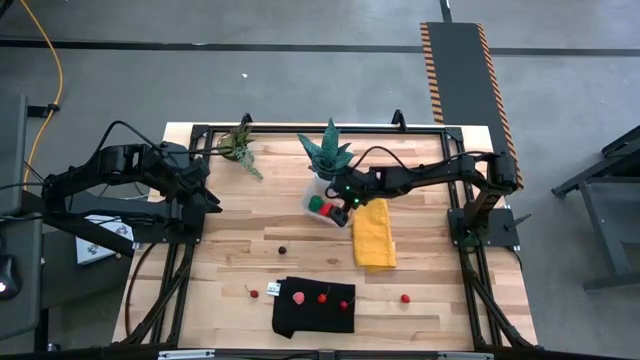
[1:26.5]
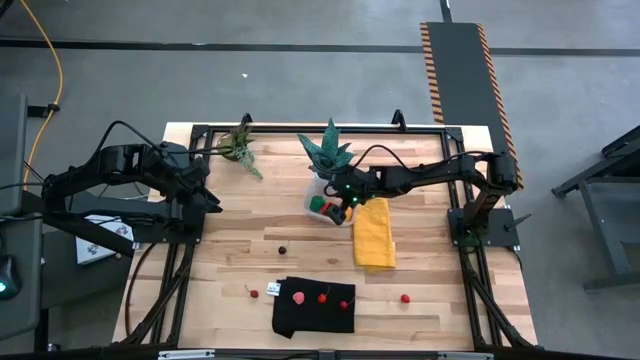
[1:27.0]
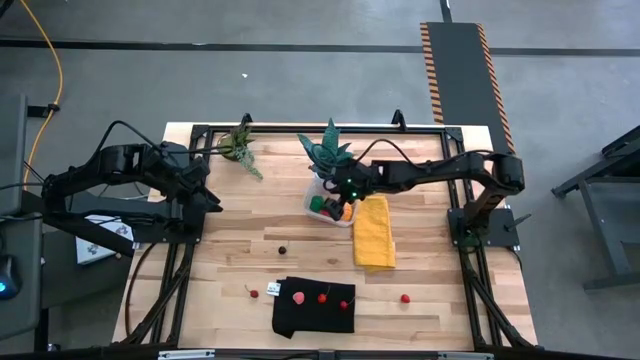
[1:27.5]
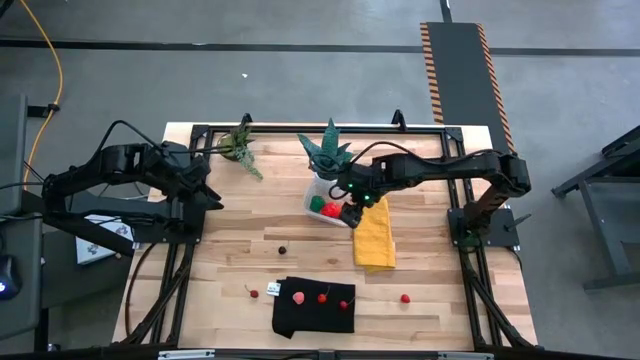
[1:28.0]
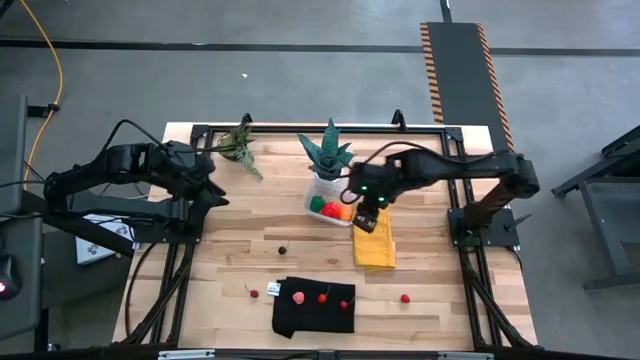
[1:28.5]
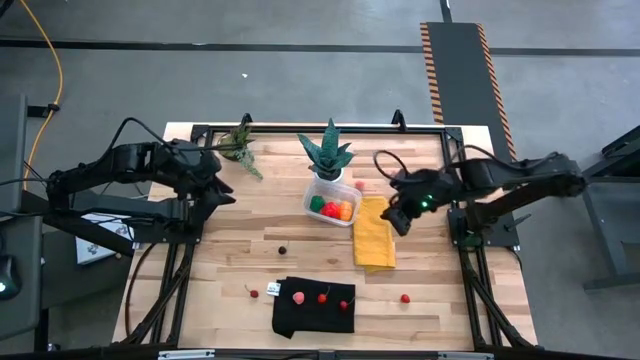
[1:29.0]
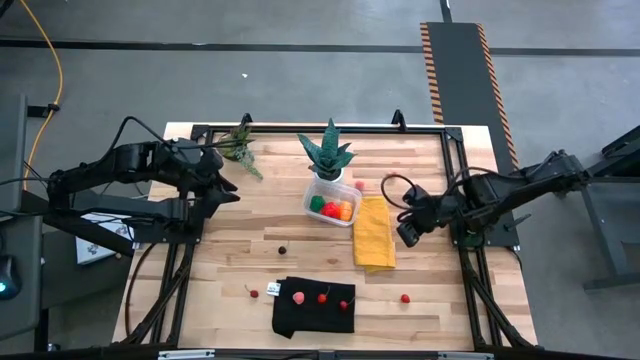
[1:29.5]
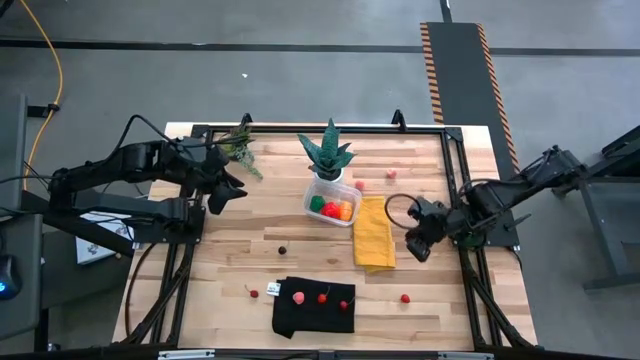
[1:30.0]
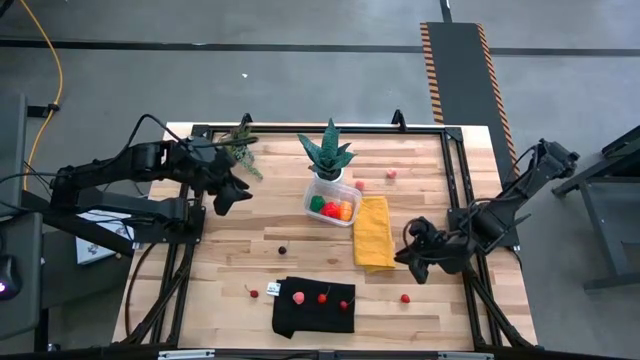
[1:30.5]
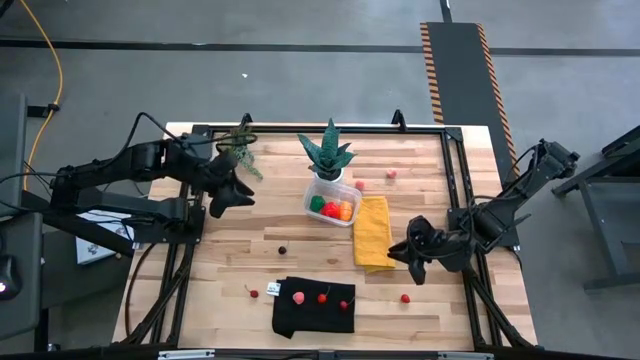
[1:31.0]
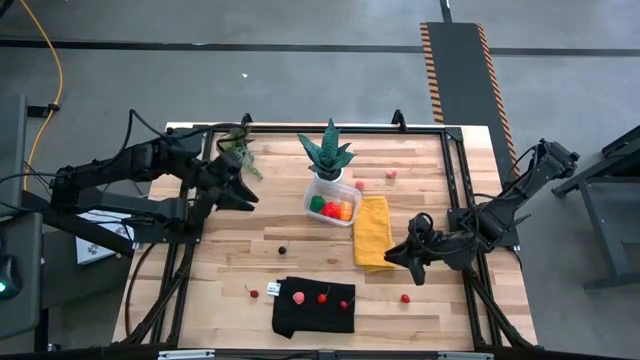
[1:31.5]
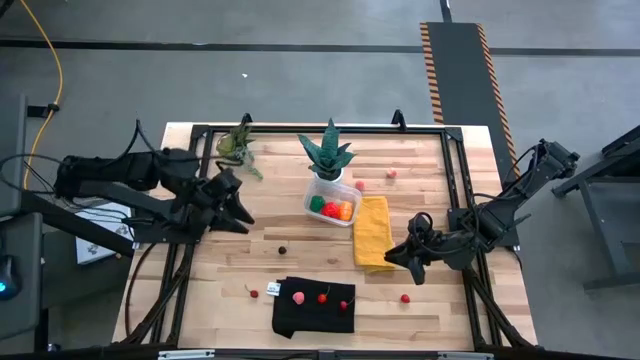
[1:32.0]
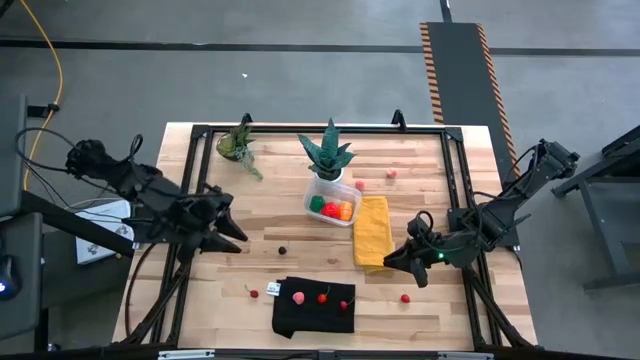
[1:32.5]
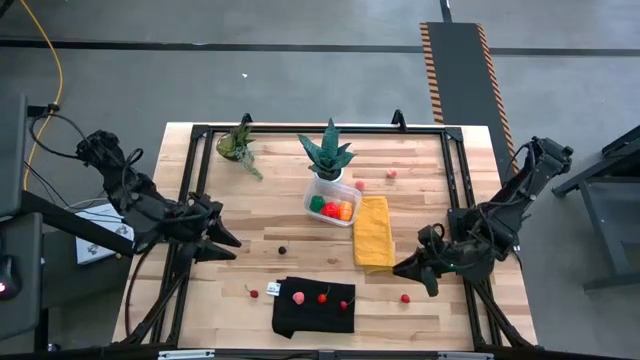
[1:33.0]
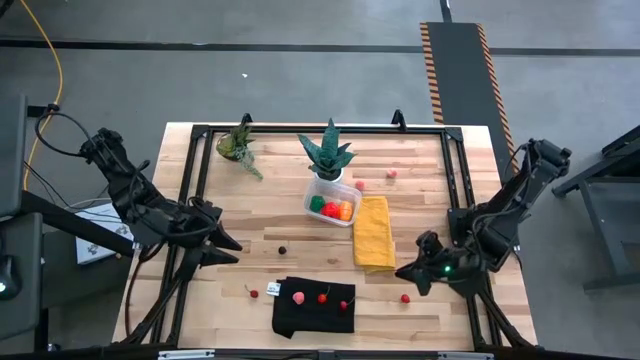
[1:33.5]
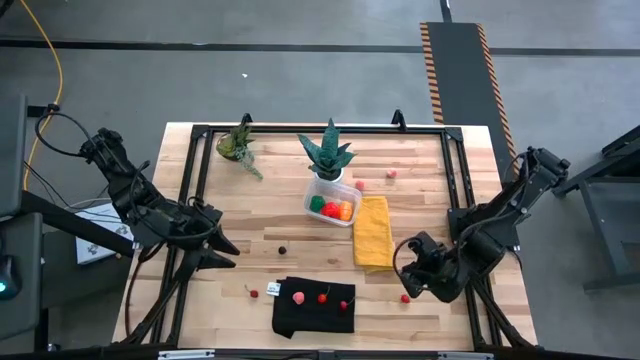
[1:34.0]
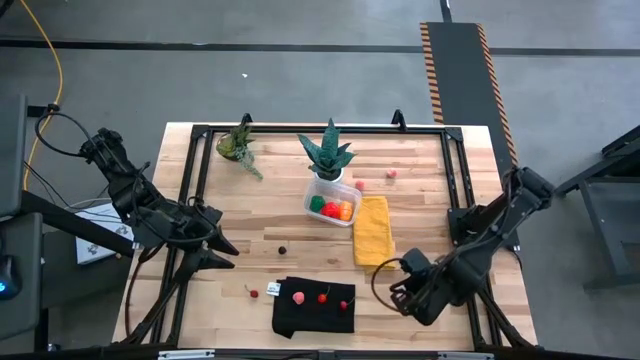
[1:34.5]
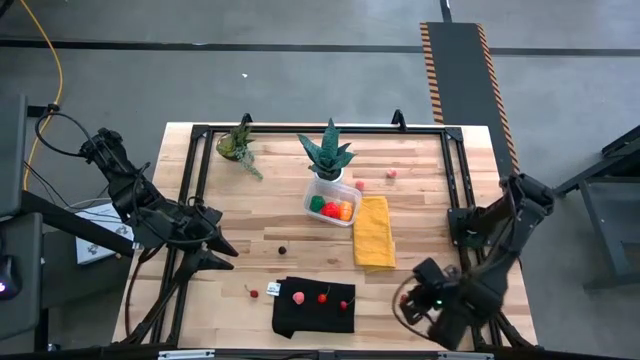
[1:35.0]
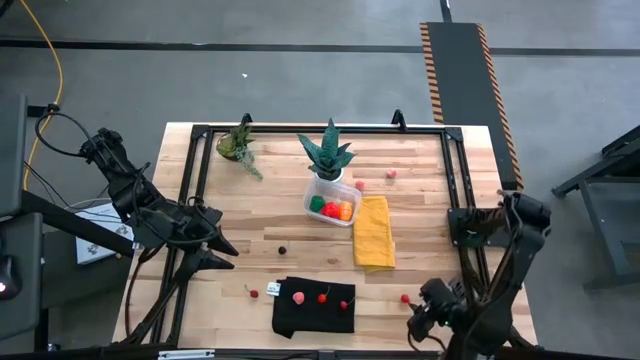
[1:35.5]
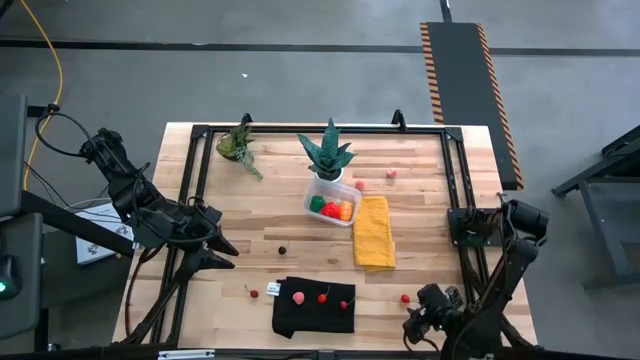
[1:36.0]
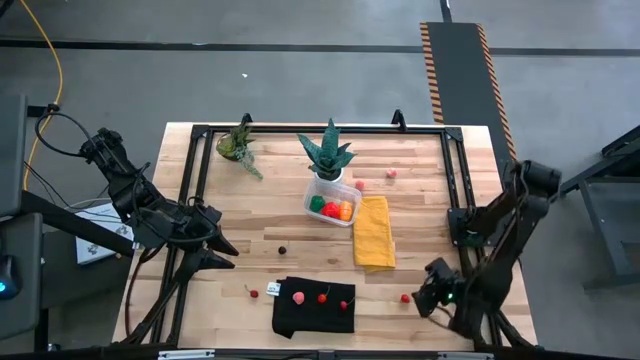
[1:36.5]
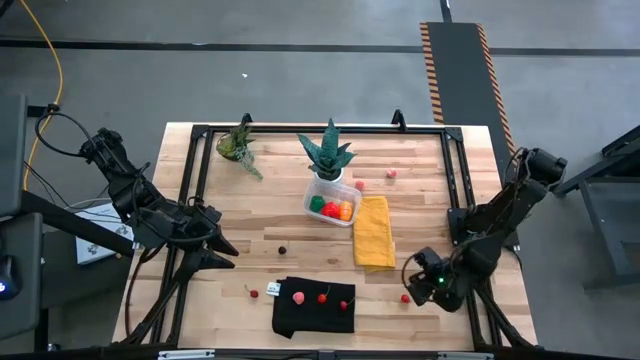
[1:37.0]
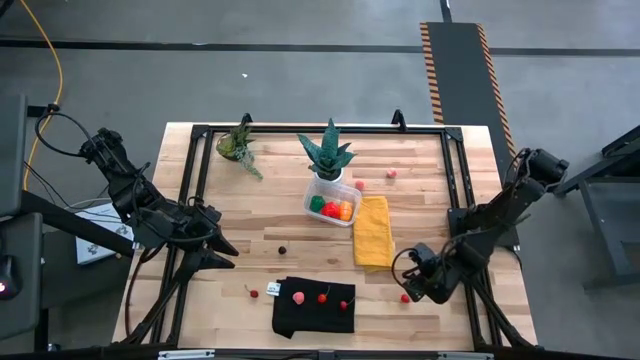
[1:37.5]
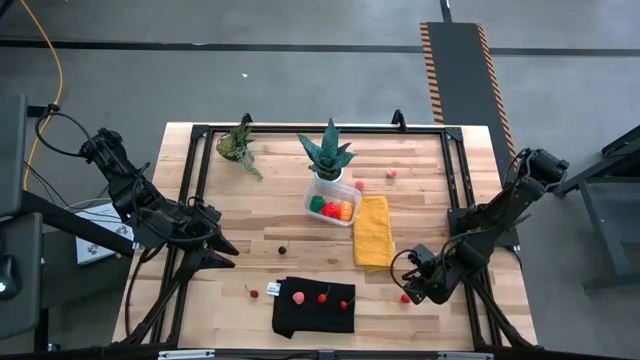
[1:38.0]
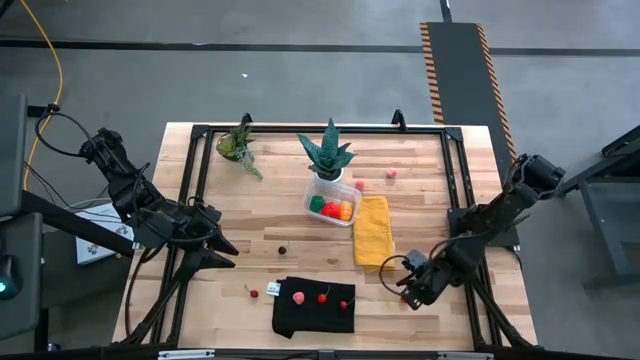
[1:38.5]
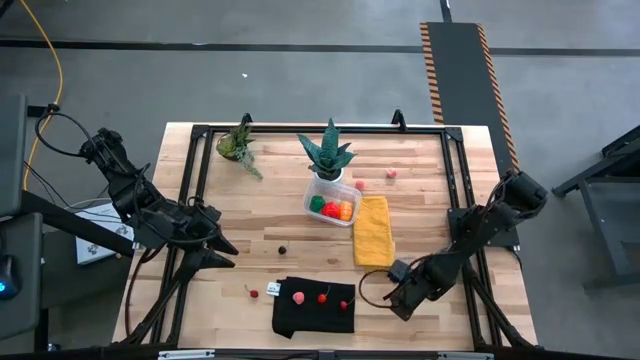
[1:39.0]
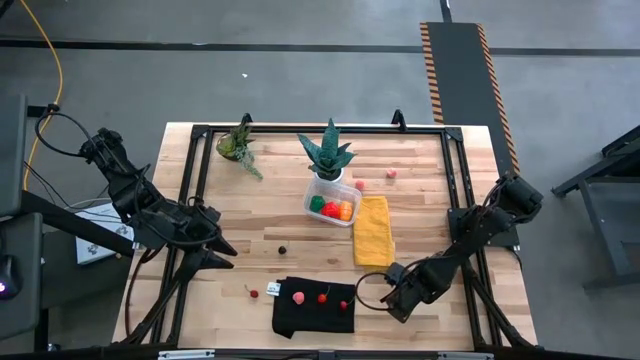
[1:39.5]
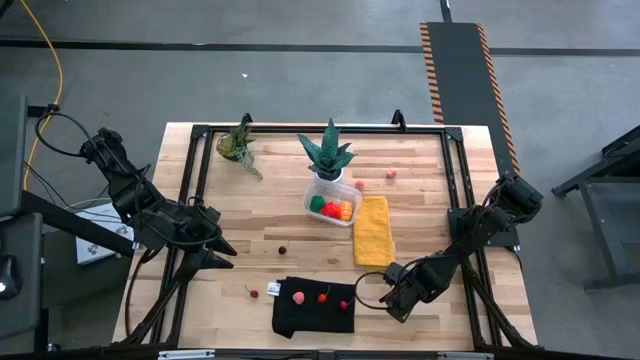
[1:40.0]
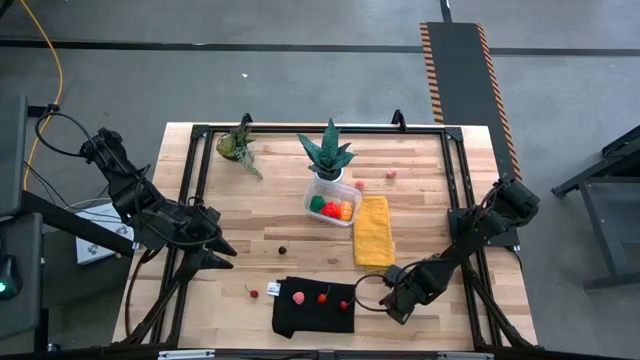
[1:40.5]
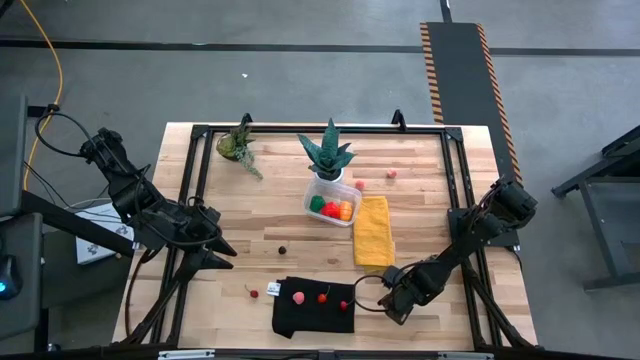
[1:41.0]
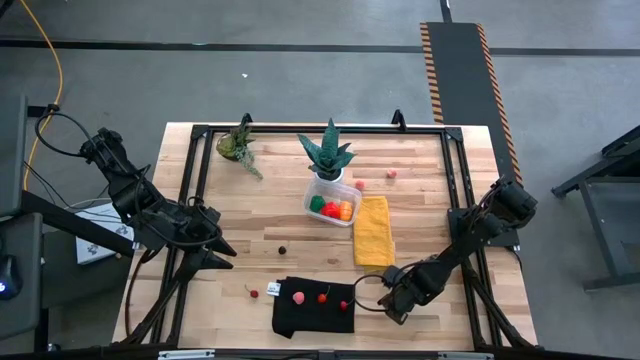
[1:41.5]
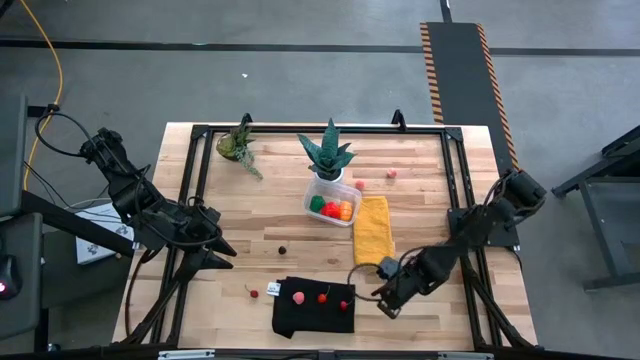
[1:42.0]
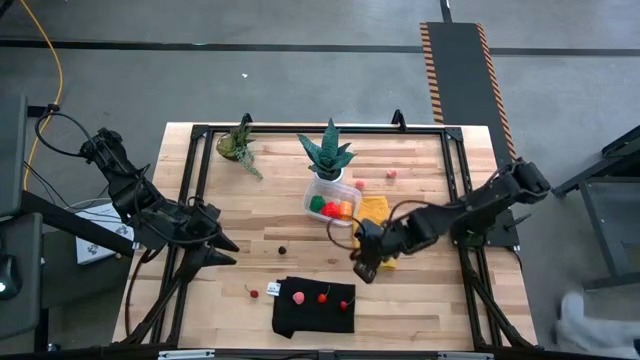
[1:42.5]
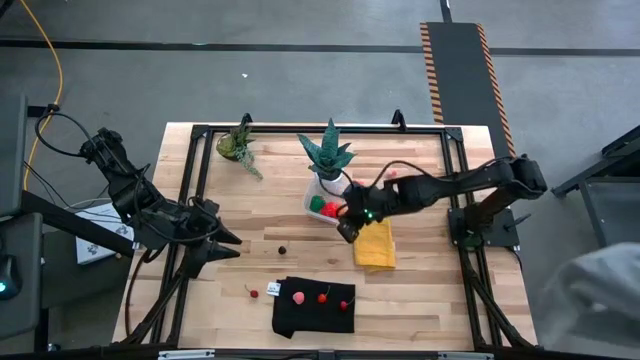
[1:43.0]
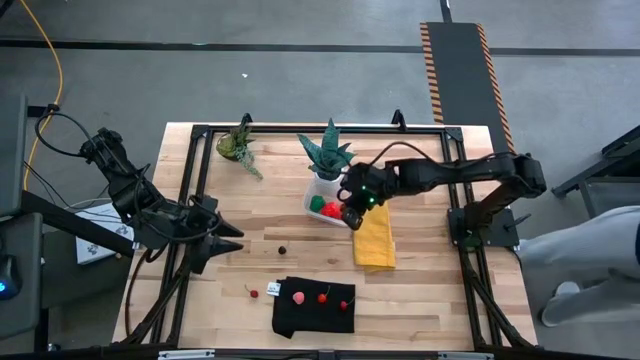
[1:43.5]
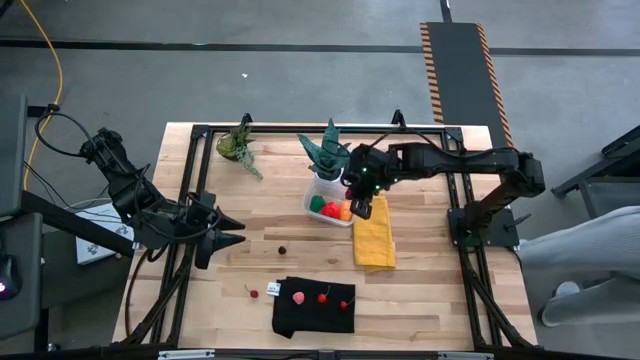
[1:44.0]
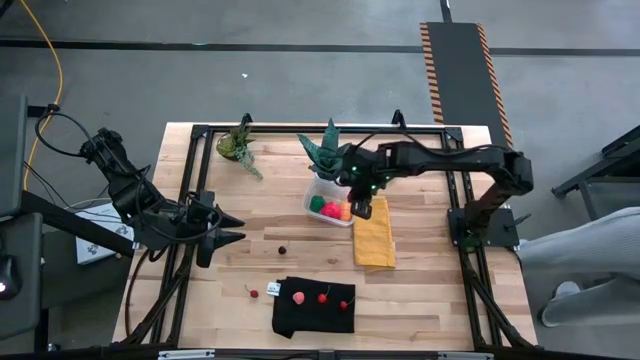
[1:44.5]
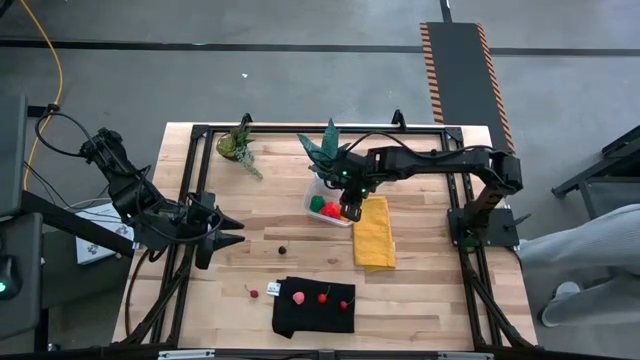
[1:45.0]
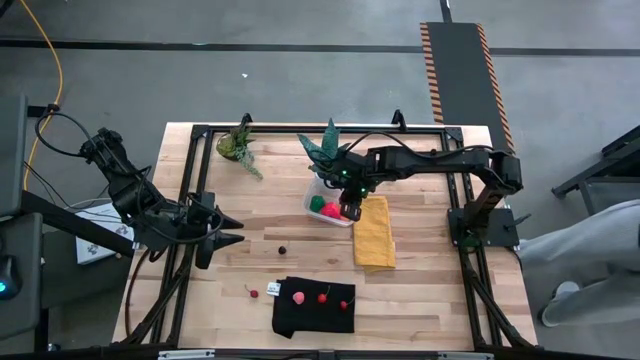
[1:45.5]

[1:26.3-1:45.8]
Task: Pick and placing Produce into tupperware
Put the red raspberry into the transparent container
